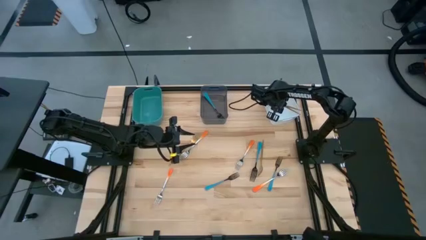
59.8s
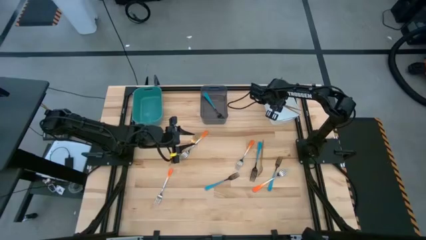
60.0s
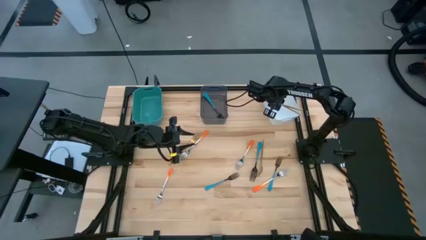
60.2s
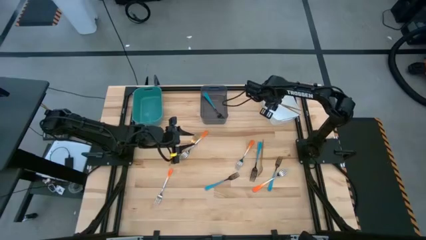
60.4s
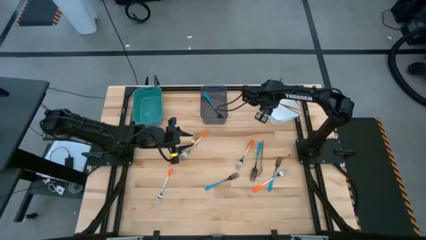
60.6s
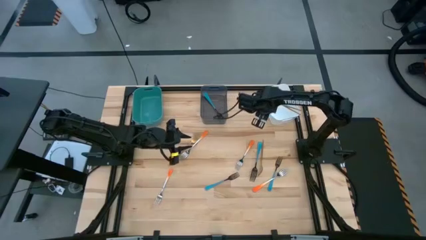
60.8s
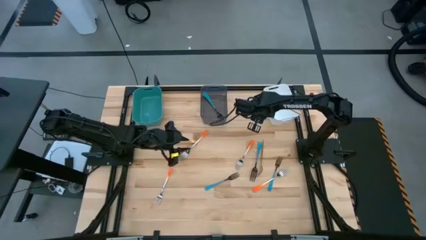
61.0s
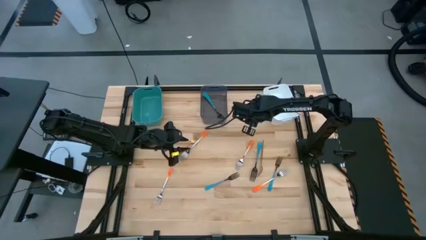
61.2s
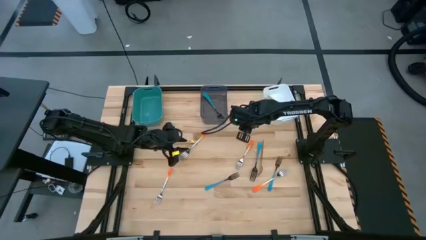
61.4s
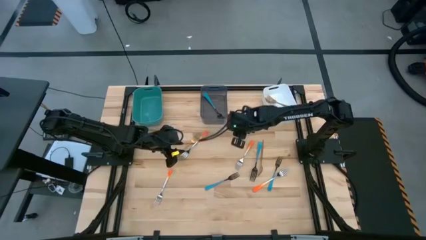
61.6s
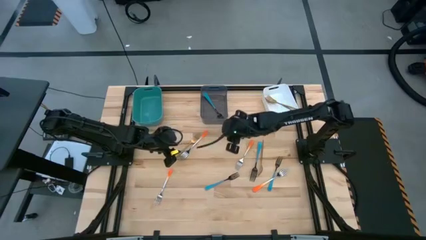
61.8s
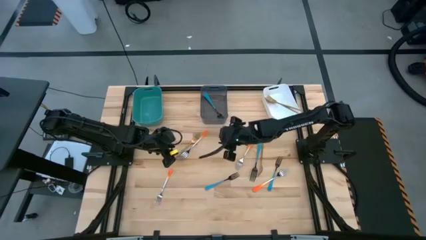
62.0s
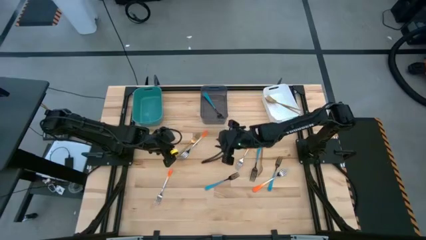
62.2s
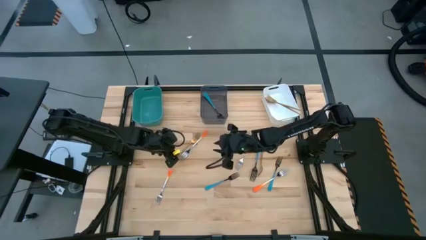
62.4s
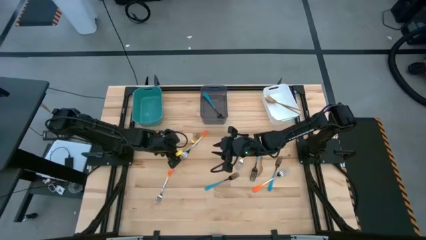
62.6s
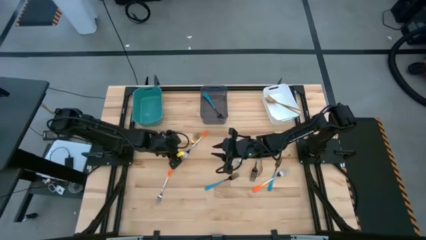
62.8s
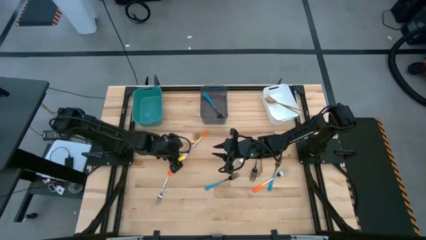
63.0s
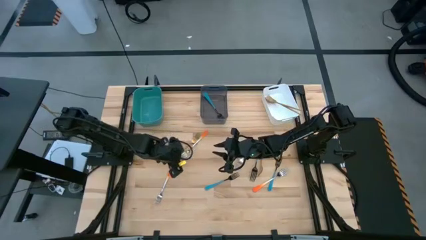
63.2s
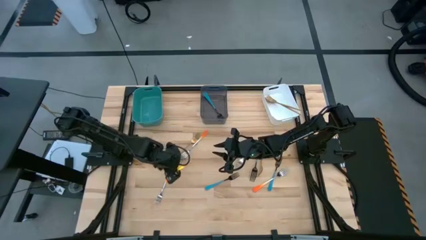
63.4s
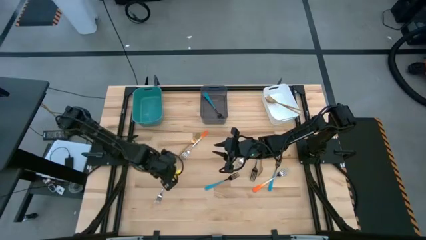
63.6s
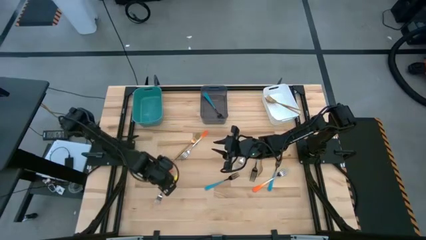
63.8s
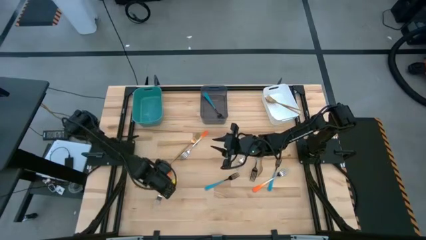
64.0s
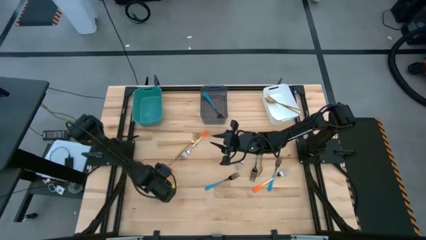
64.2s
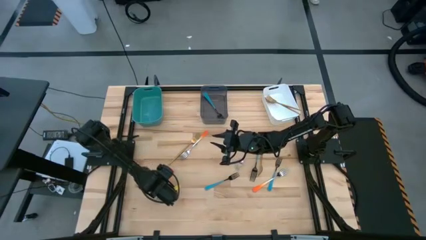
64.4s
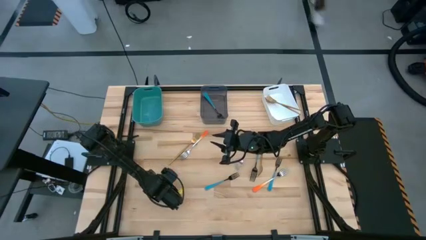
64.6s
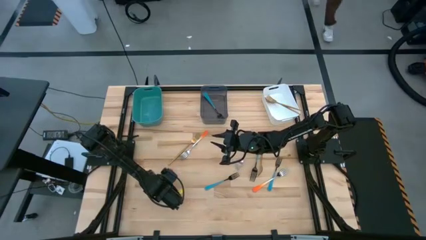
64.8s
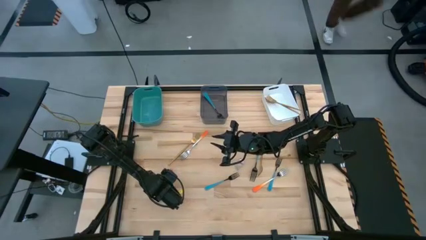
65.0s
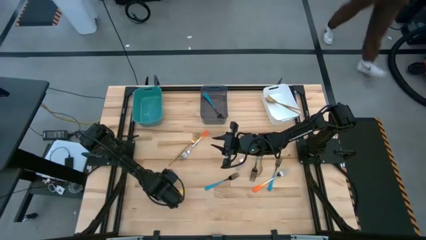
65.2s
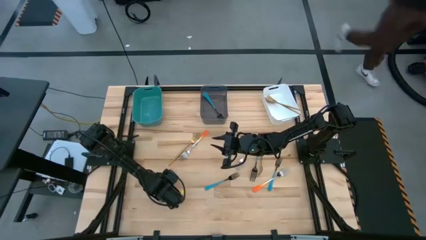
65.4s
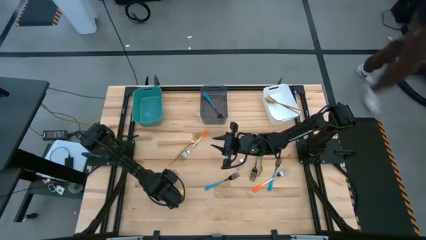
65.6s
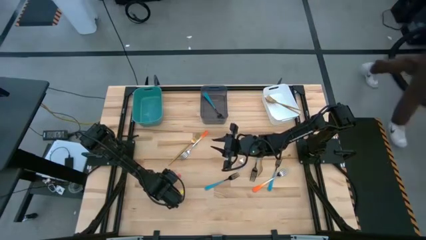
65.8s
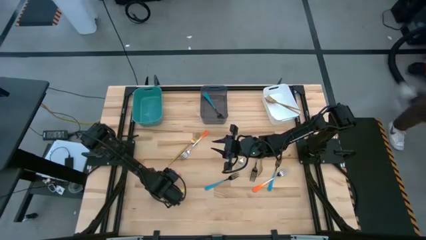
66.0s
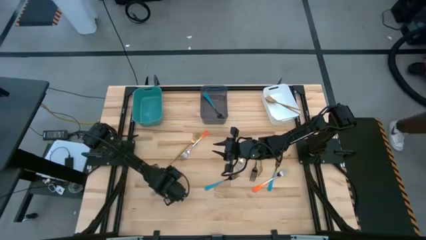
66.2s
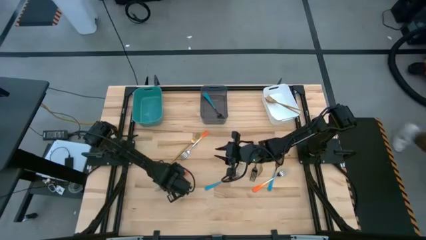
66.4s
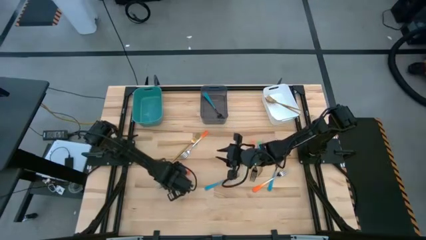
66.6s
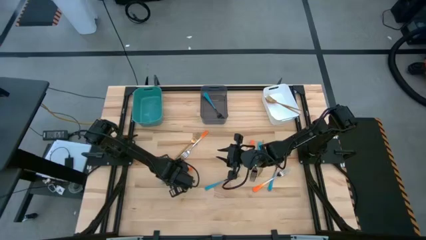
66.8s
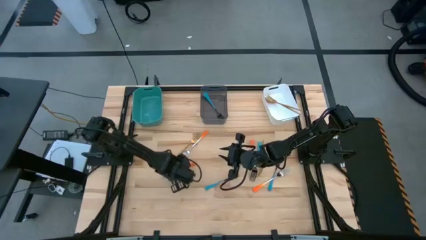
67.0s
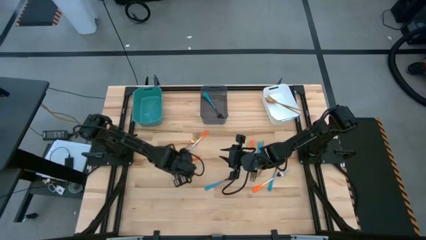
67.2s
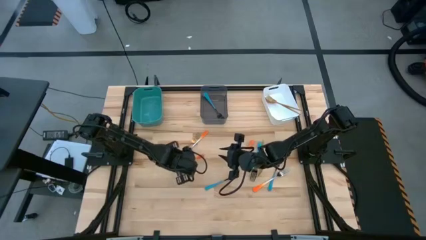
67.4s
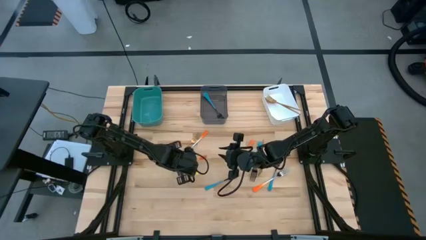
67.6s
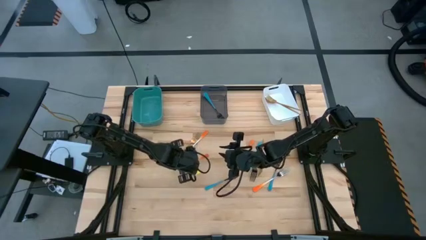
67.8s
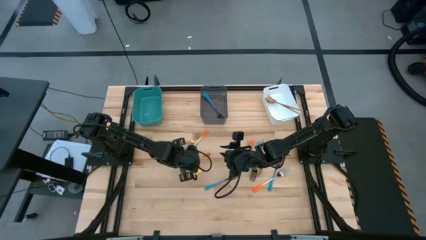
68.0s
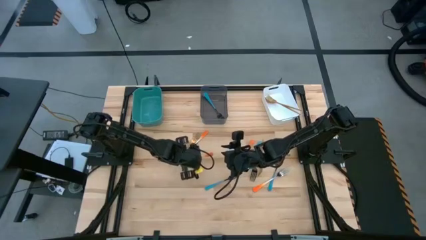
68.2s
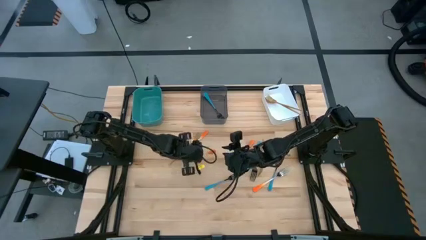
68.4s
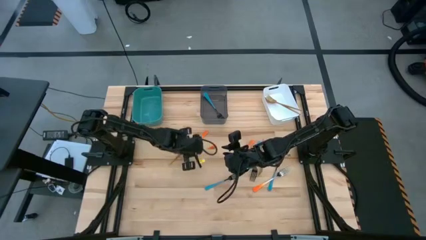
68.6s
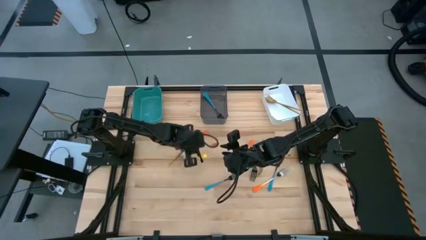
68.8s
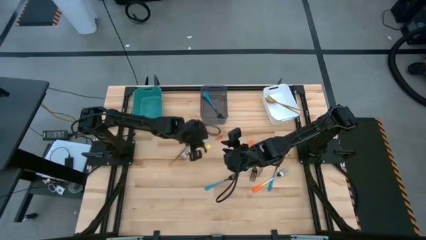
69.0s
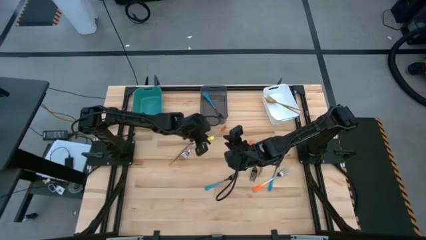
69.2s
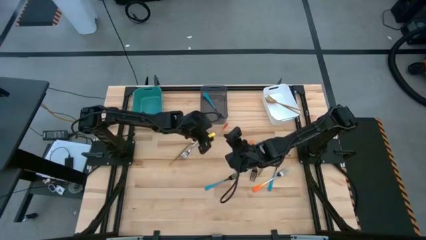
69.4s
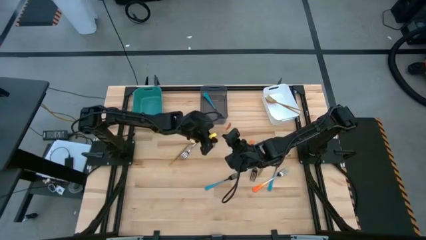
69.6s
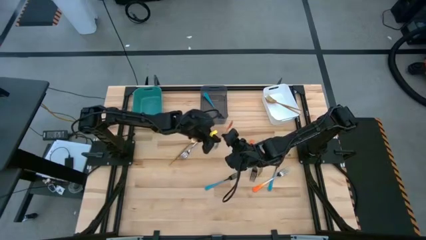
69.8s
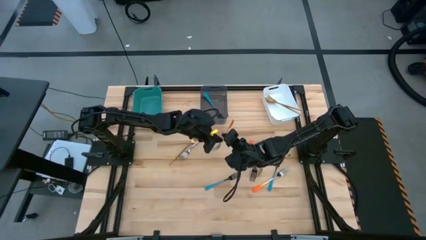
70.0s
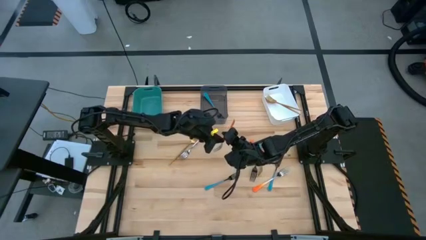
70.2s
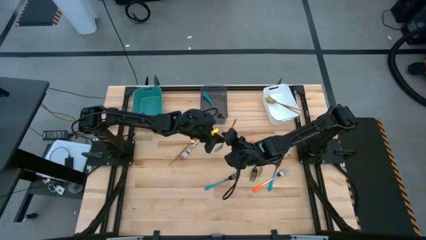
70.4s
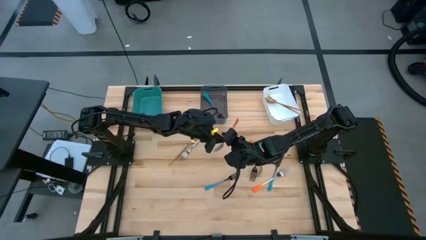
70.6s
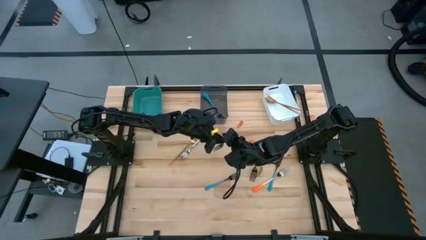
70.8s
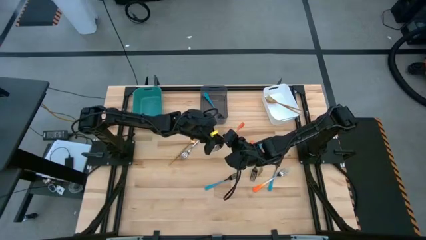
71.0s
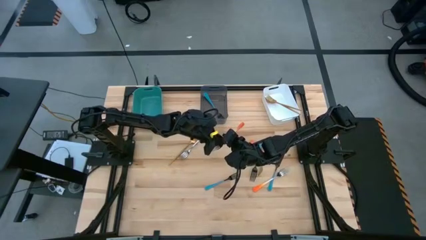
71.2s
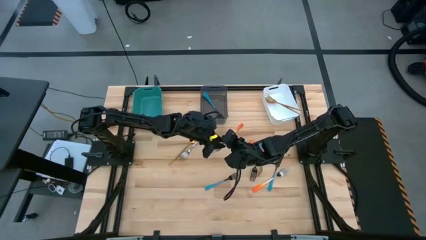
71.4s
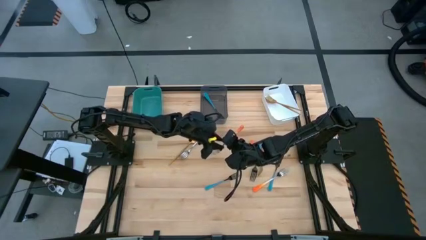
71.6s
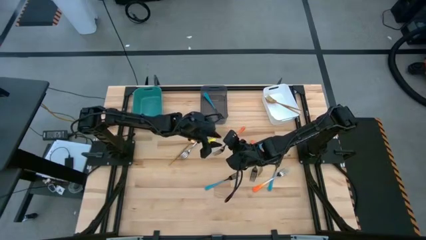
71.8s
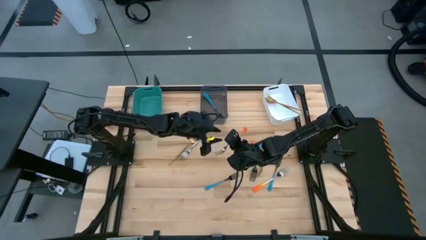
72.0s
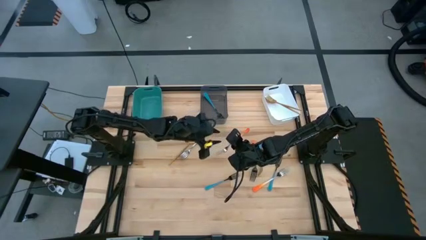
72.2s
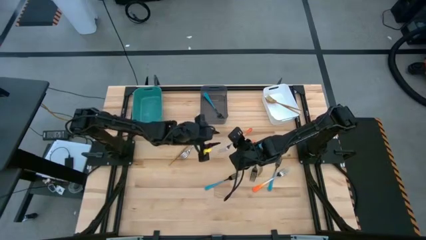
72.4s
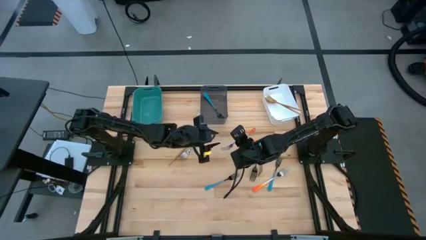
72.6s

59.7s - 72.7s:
Task: Sort silverware by color (type)
Put the bottom left orange fork into the green bin
